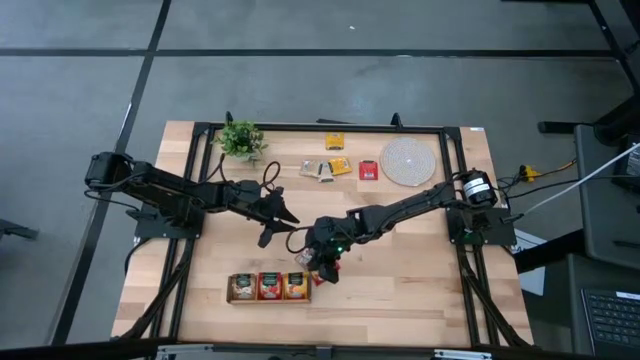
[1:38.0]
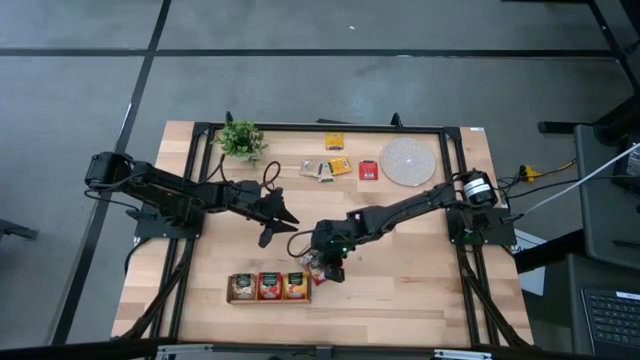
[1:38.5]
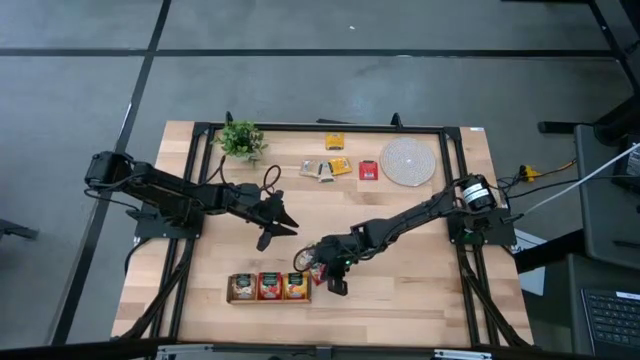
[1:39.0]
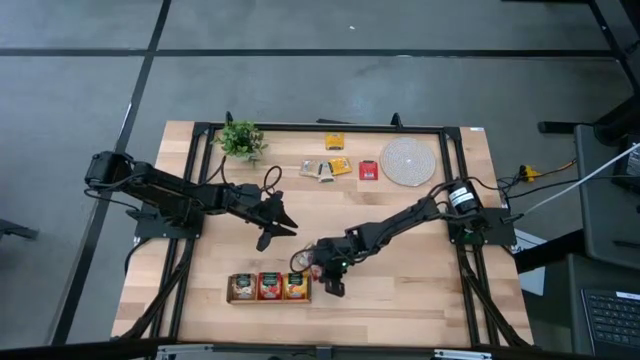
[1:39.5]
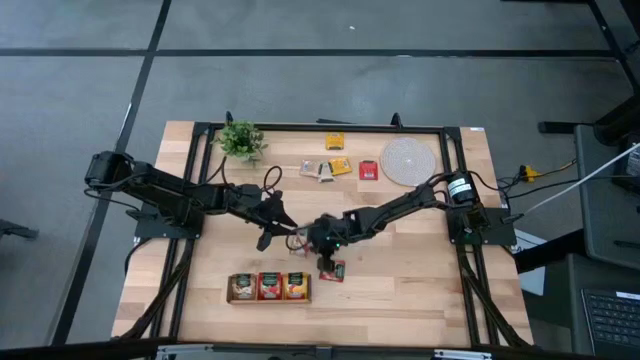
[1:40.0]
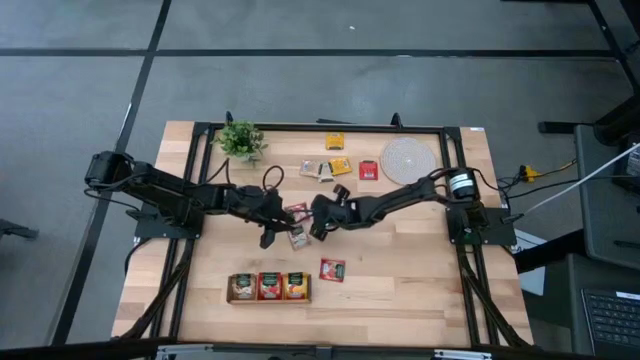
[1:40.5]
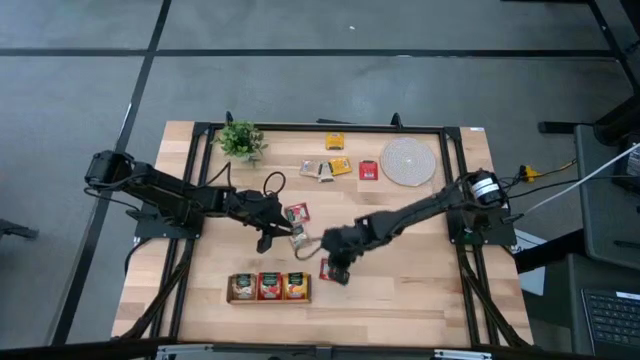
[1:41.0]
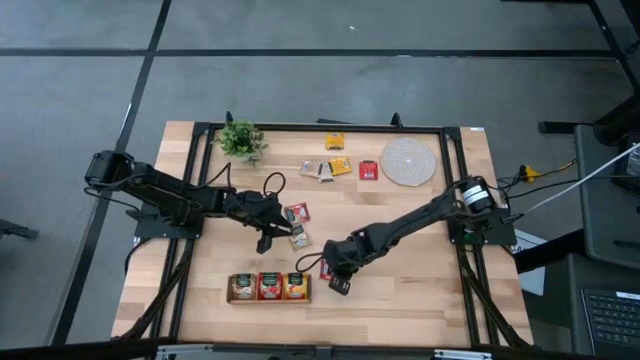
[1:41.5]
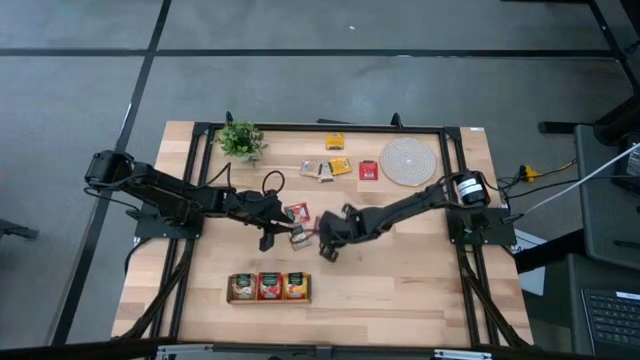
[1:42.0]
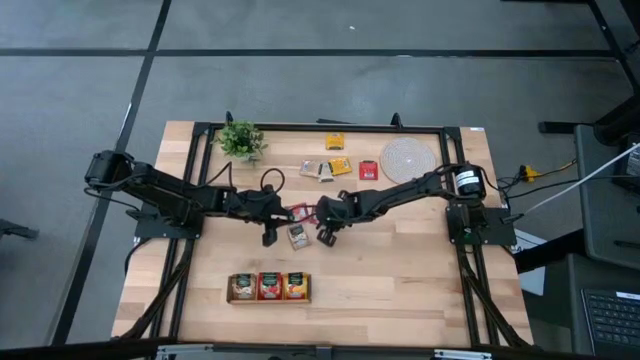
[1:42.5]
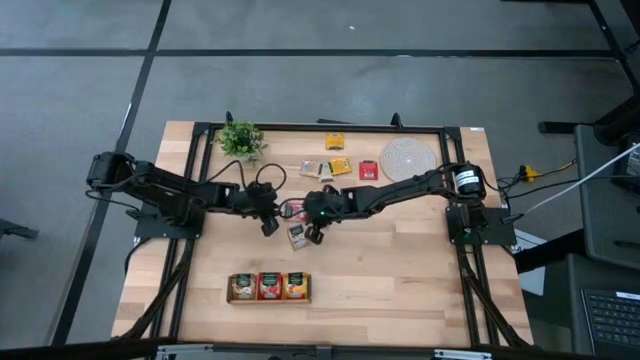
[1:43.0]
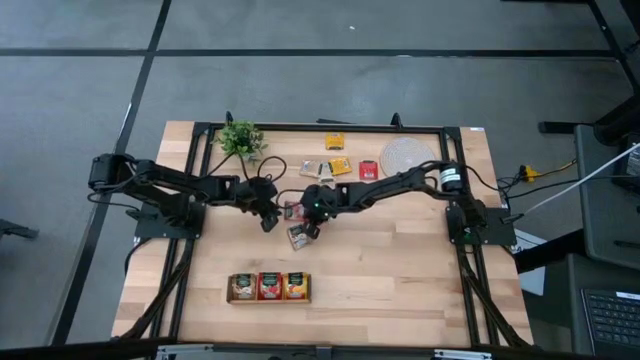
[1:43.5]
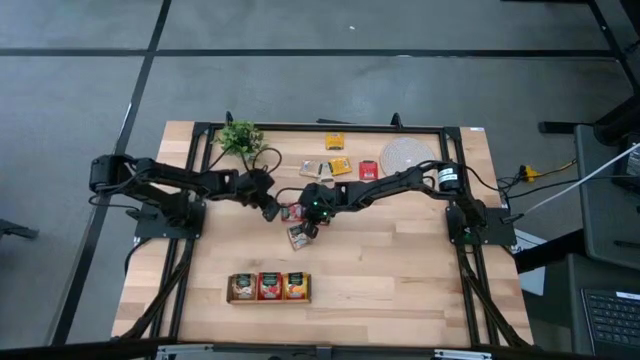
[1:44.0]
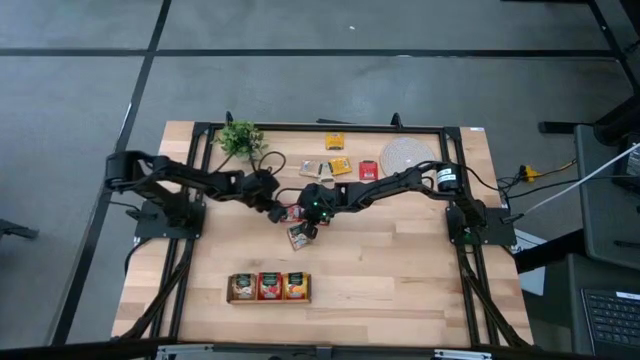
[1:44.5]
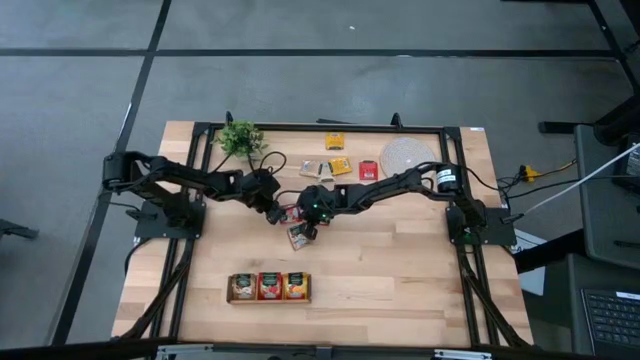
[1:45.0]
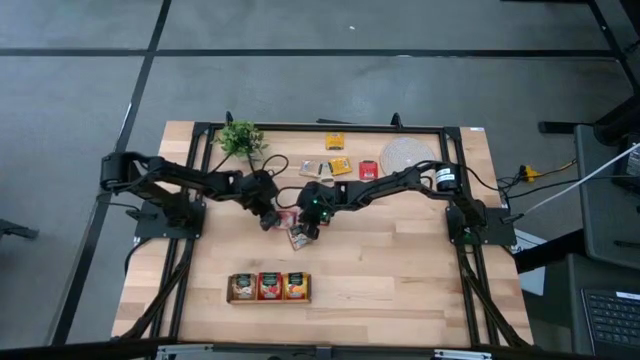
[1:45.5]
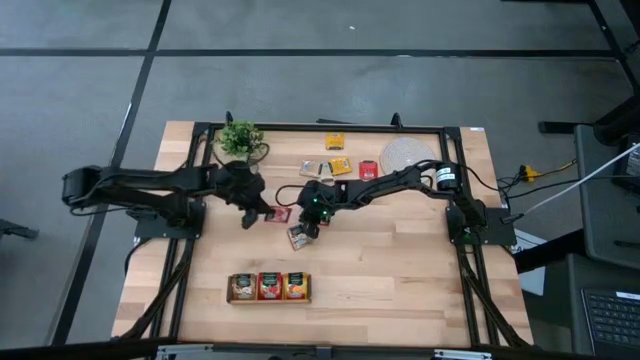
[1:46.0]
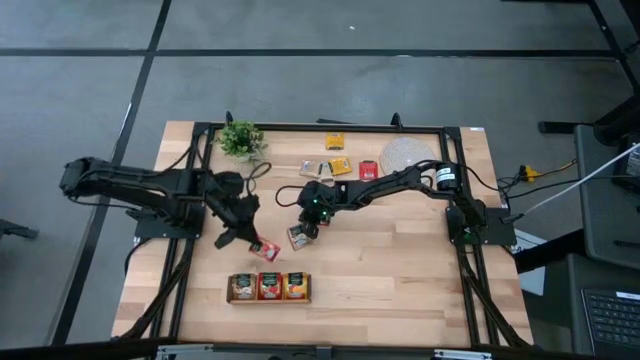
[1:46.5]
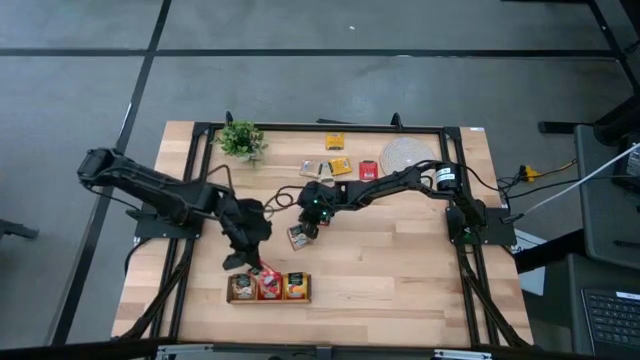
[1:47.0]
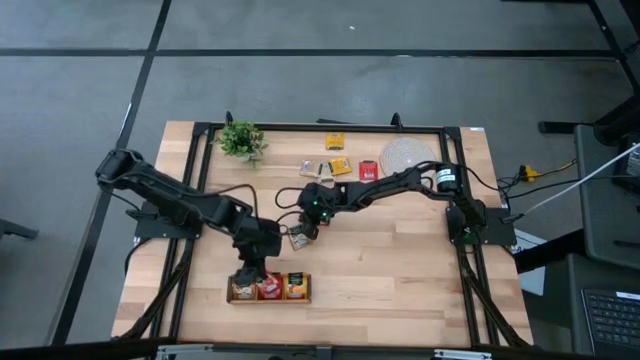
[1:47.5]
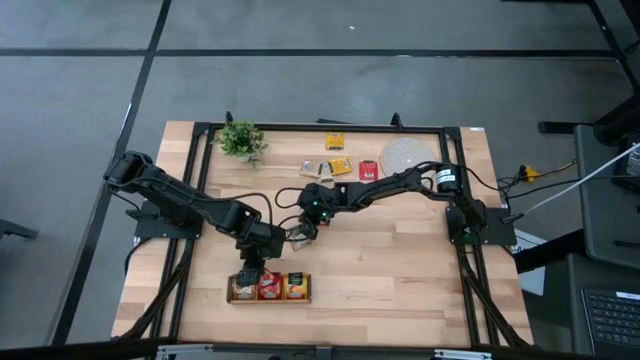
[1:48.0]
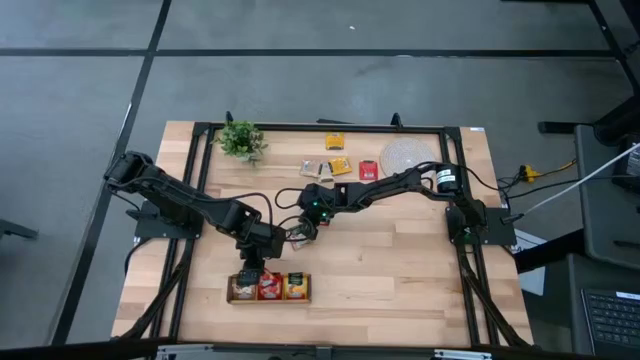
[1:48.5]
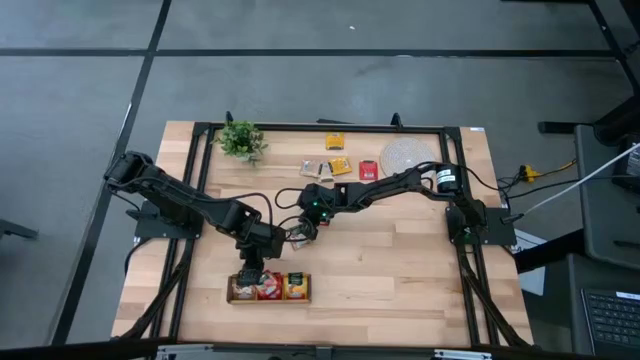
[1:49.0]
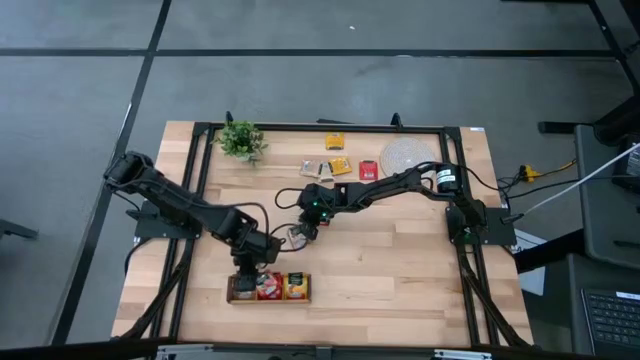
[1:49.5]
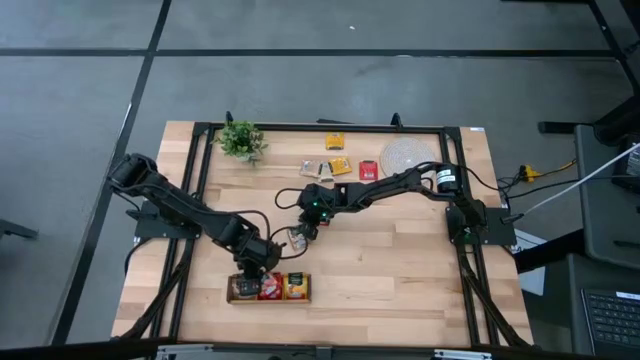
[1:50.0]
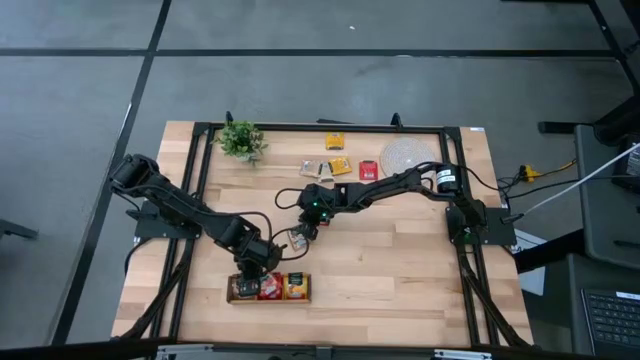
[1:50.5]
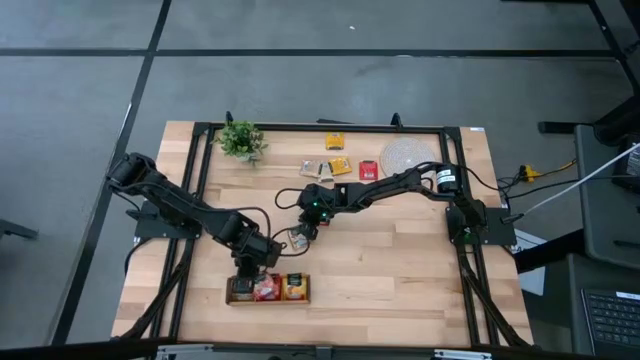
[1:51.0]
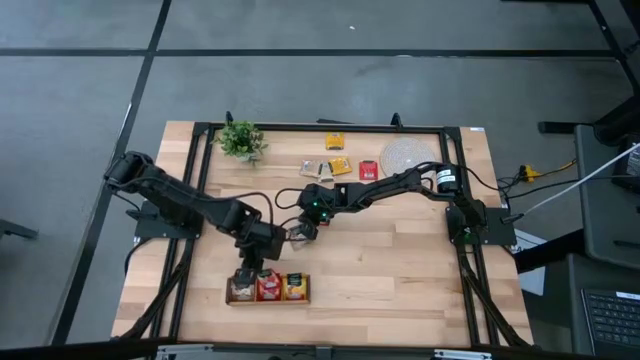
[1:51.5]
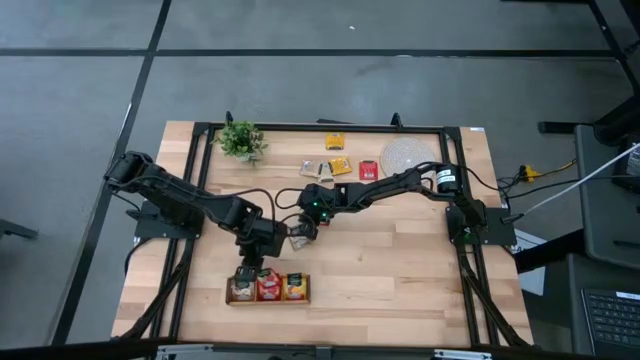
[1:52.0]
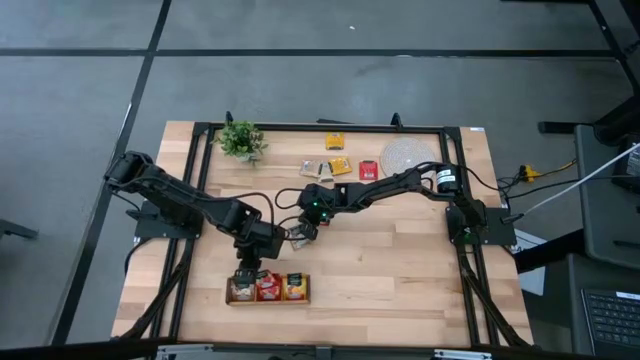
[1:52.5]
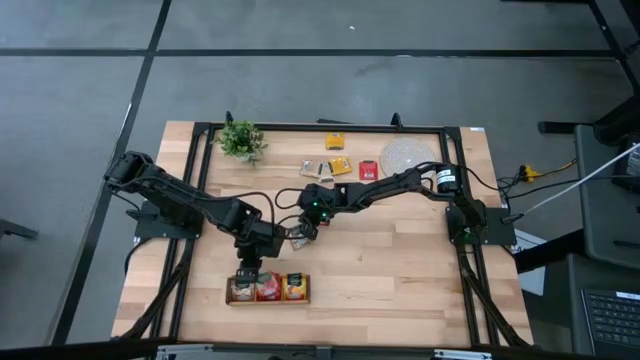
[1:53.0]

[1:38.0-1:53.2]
Task: Pick & Place Tea
Put the red tea bag into the middle section of the wooden organizer

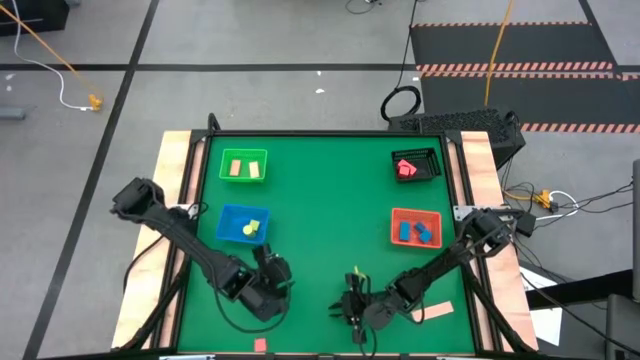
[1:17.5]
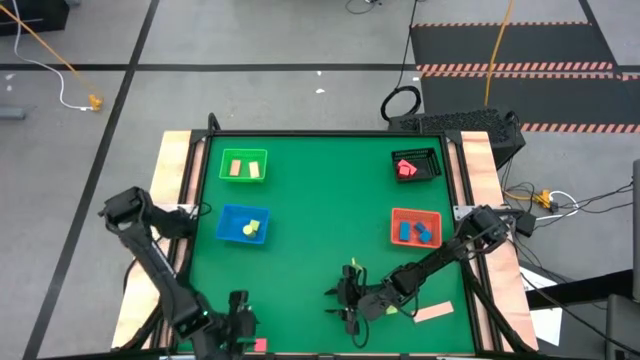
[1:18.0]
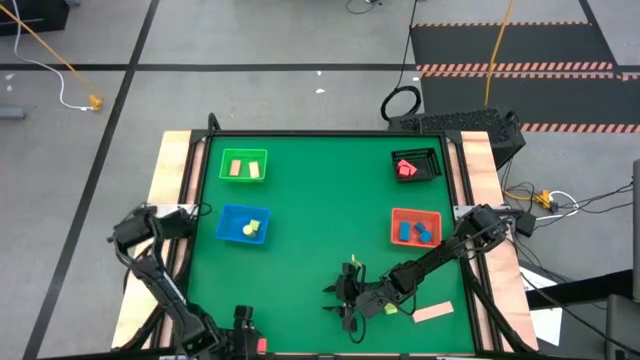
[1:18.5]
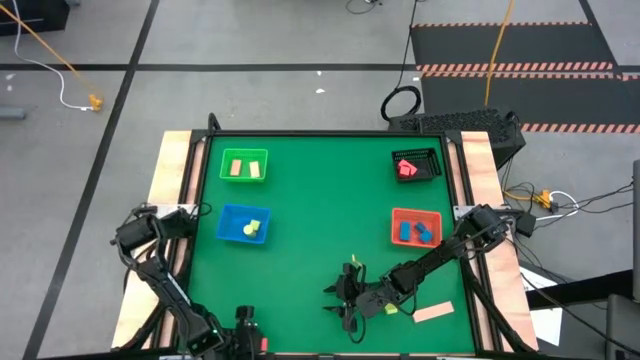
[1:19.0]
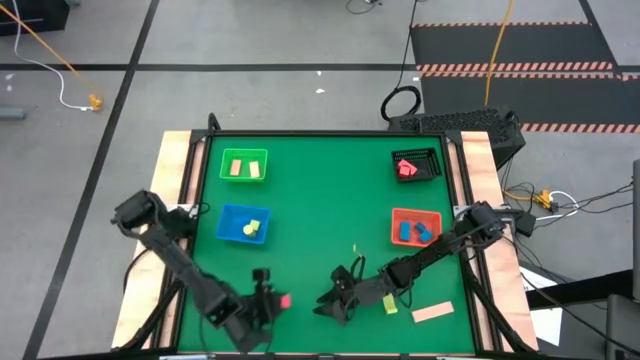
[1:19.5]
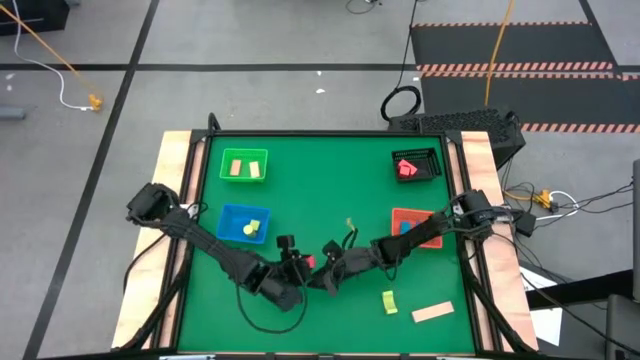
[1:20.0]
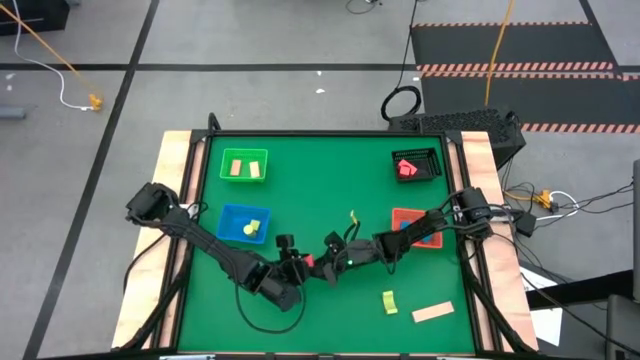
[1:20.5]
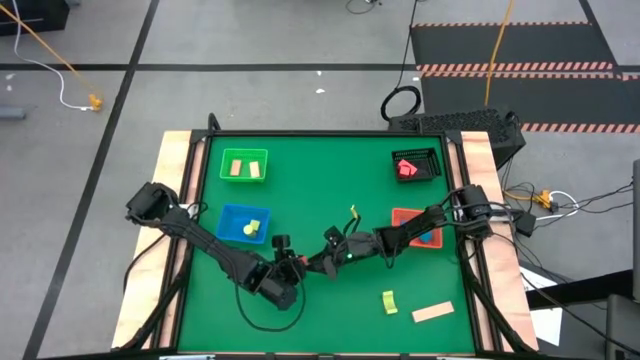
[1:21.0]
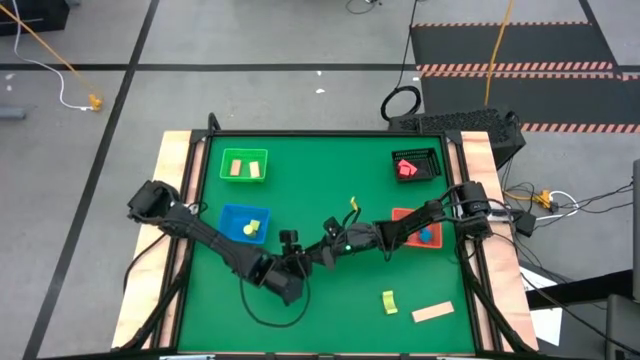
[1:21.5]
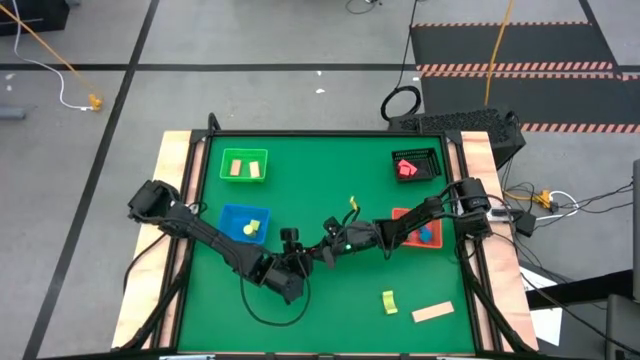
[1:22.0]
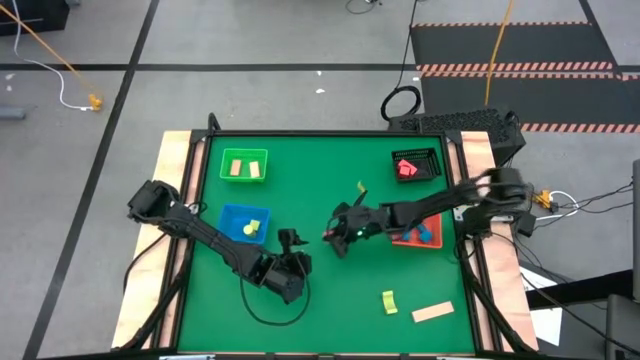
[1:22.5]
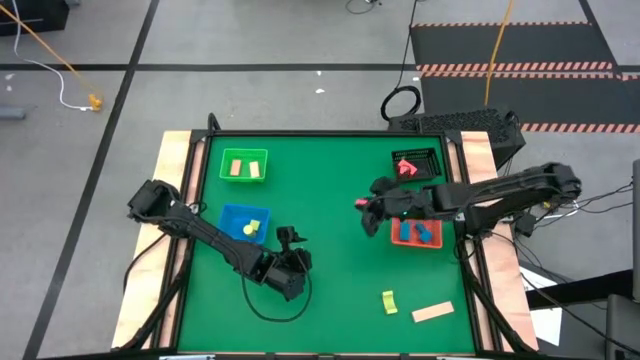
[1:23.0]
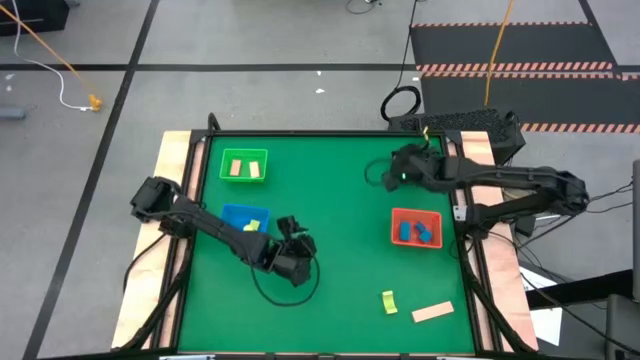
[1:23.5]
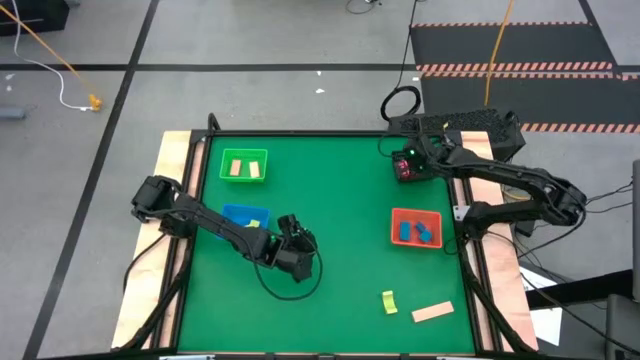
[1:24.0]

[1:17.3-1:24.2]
Task: Sort & place blocks by color
Put the orange block into the black bin
